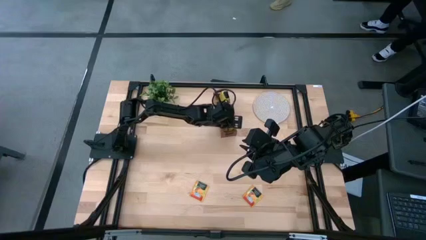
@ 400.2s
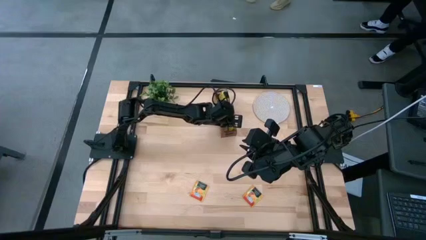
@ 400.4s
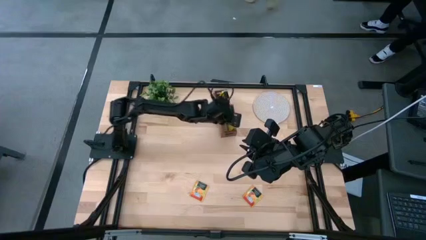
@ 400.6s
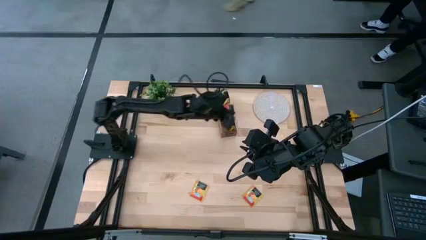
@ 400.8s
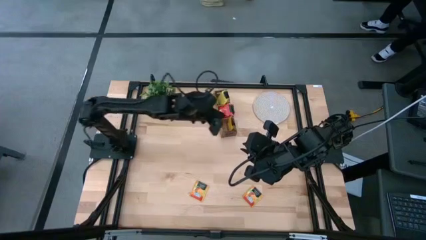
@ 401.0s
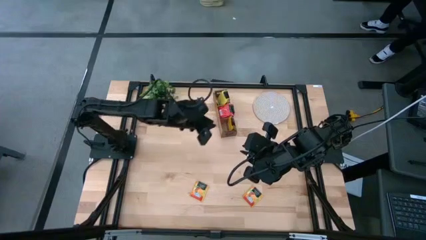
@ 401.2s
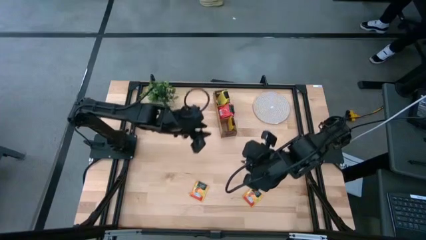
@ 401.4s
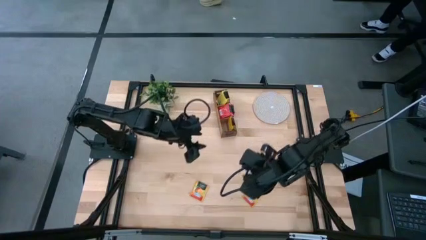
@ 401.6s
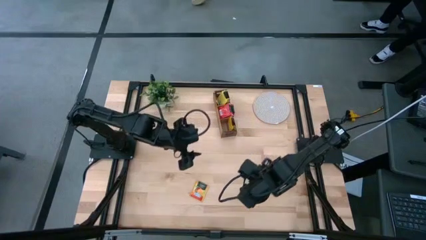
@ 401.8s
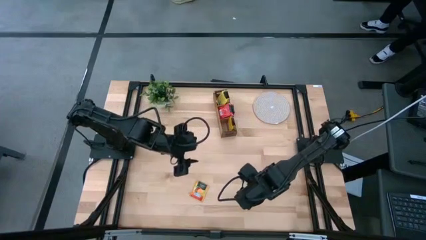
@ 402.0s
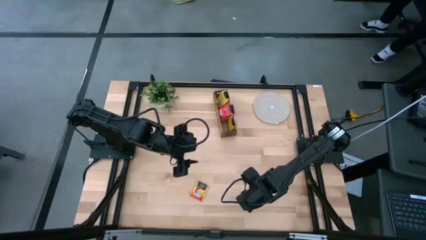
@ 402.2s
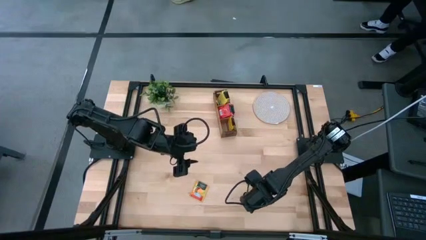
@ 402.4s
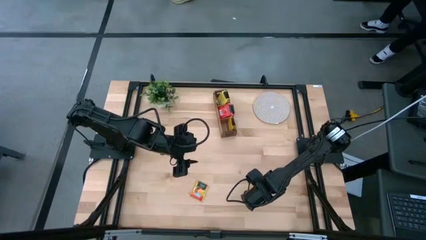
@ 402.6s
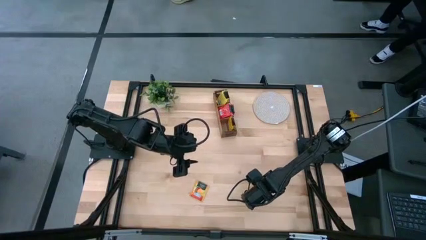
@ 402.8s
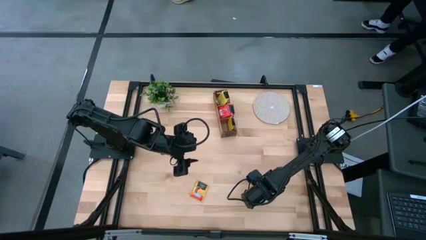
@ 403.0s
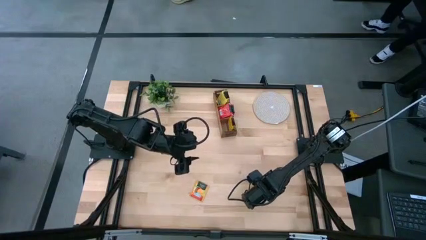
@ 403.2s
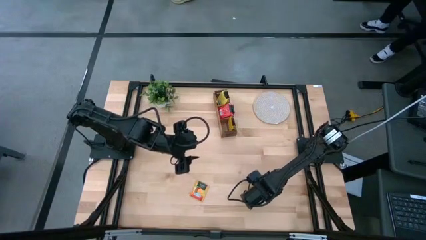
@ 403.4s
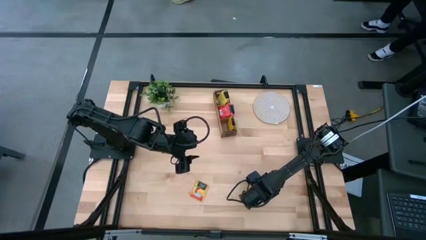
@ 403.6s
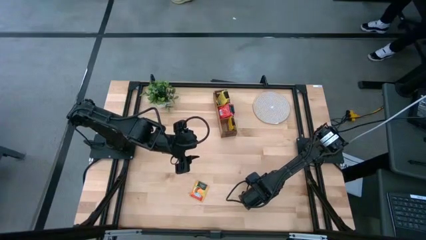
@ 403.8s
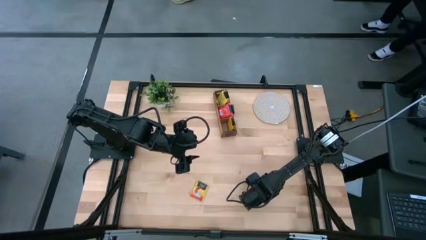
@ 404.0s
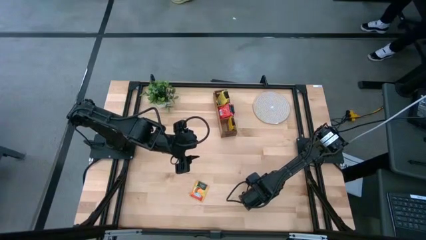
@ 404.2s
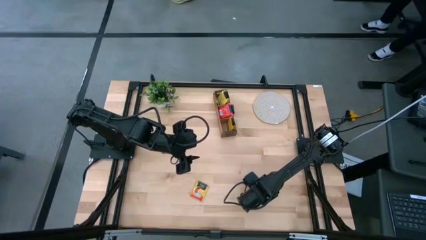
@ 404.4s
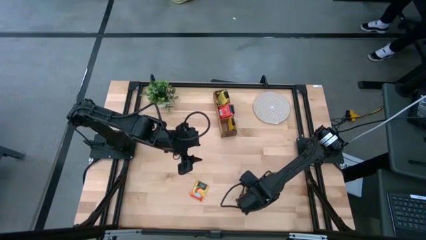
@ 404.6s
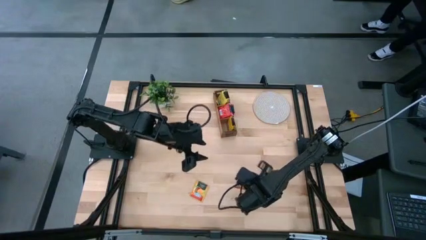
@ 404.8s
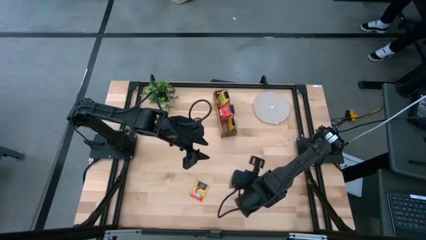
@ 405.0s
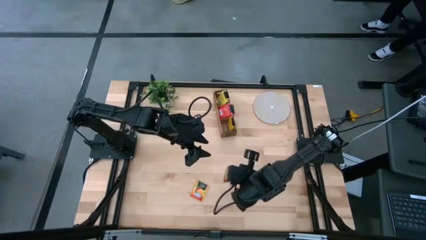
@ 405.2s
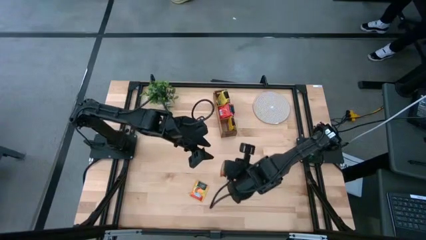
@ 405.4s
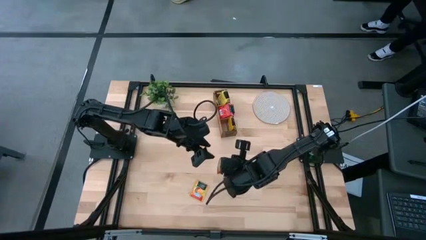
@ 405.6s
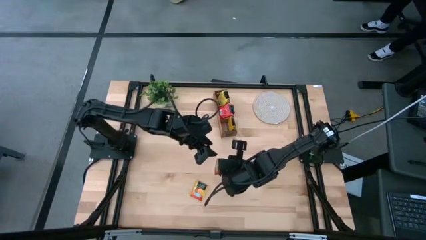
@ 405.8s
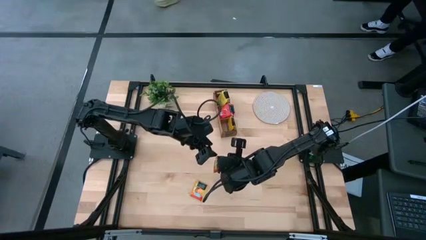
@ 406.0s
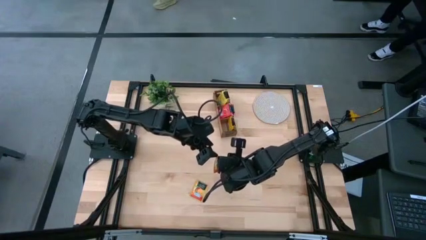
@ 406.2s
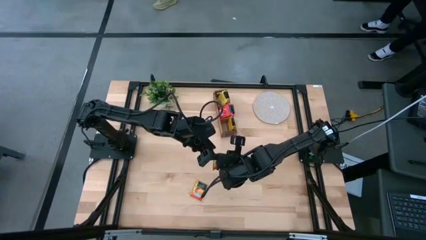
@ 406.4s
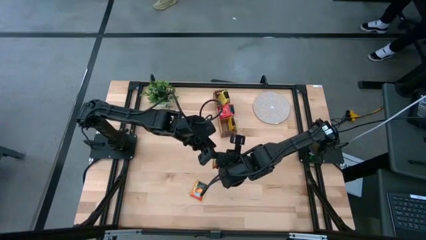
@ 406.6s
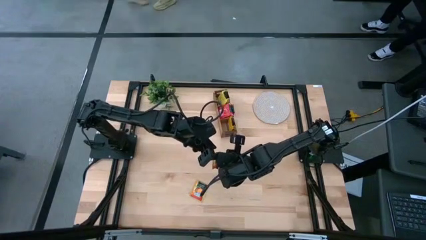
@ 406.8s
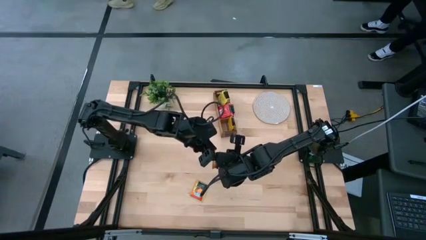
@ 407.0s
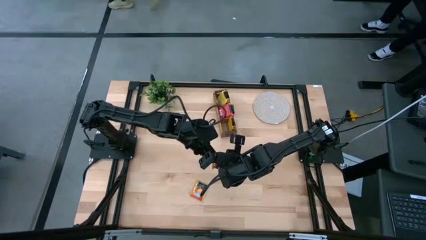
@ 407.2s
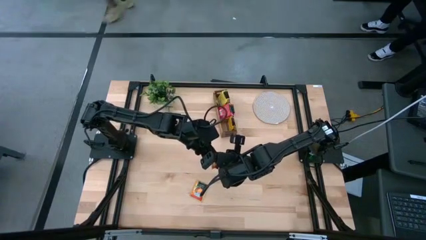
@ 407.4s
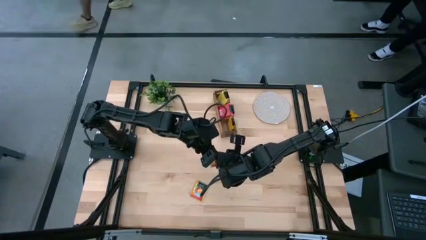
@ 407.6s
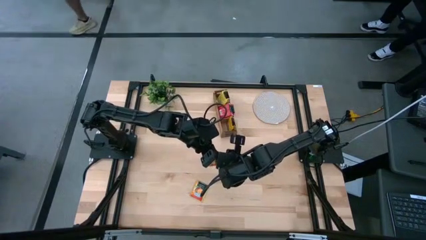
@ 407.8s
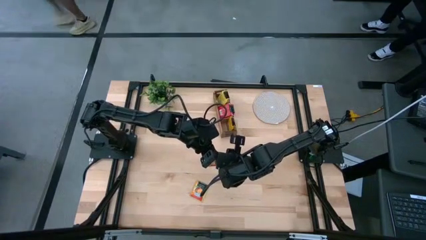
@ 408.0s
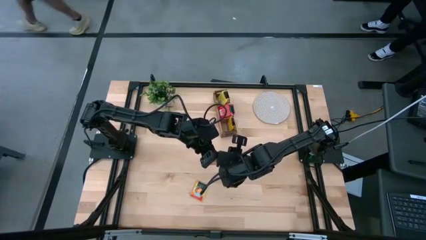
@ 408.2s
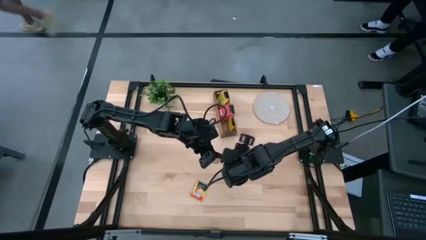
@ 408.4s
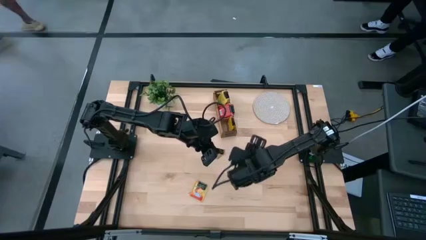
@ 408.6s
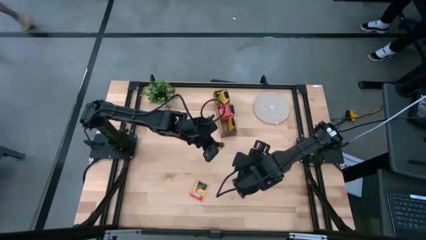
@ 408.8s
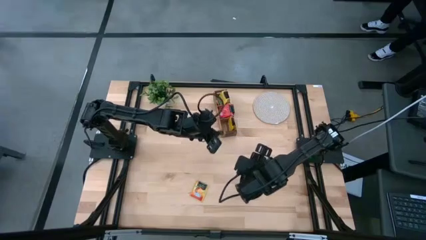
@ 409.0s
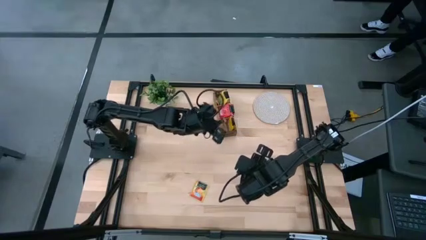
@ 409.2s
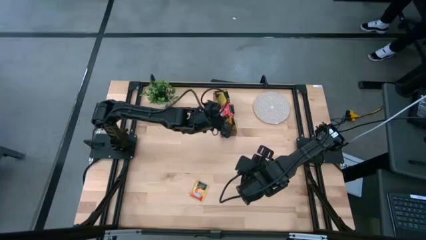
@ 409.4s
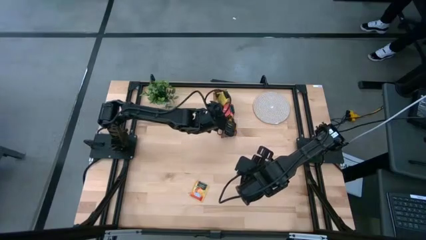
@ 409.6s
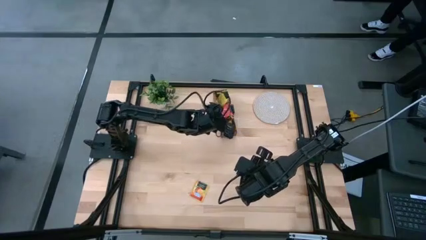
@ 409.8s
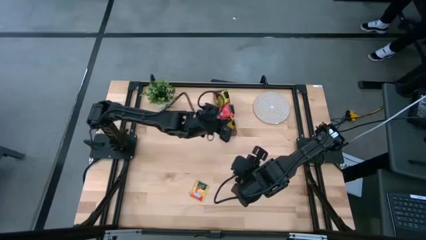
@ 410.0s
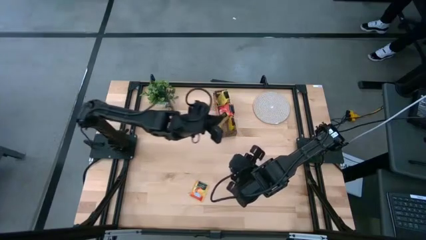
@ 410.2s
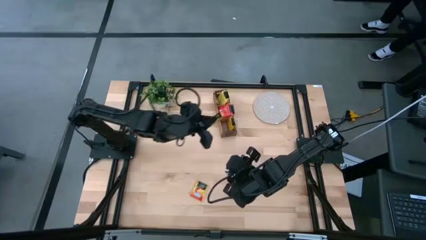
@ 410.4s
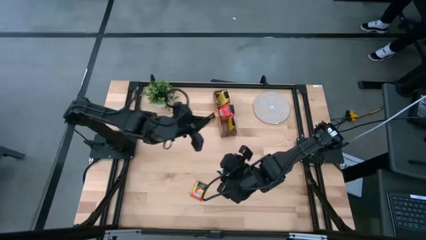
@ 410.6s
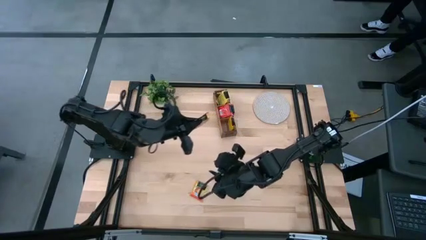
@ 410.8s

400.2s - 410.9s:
Task: Pick & Place Tea
Put the orange tea bag into the left section of the wooden organizer

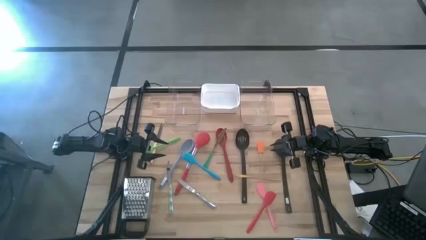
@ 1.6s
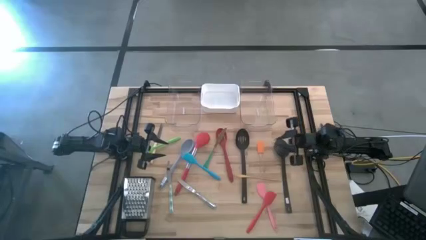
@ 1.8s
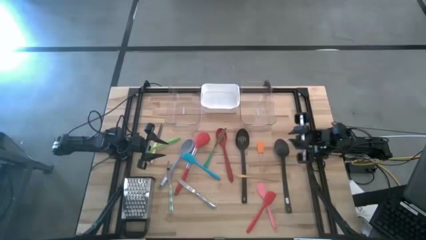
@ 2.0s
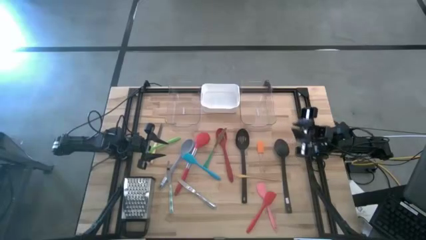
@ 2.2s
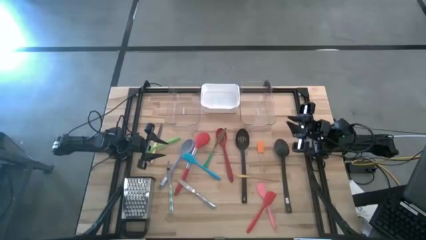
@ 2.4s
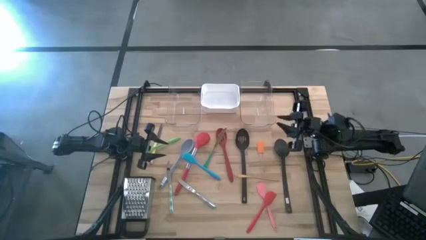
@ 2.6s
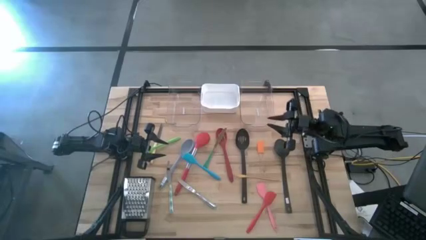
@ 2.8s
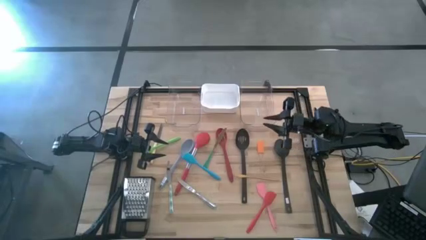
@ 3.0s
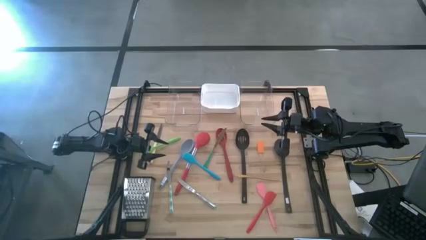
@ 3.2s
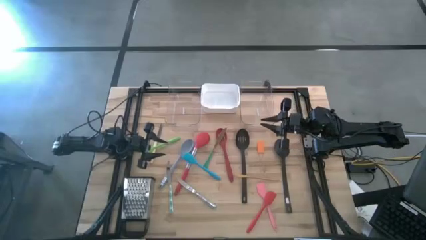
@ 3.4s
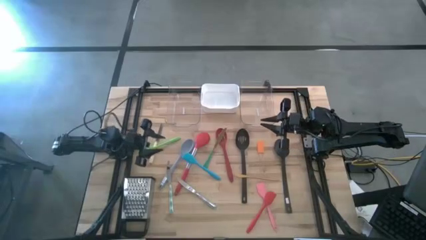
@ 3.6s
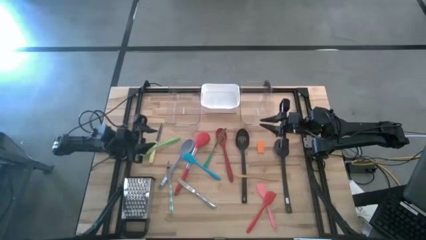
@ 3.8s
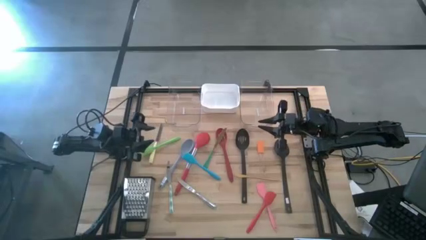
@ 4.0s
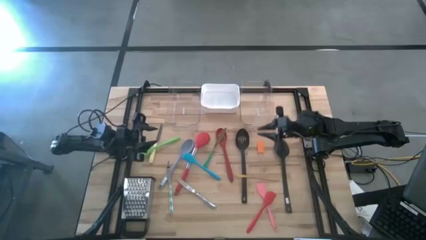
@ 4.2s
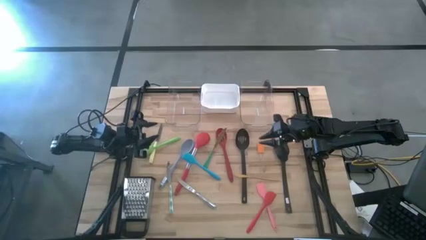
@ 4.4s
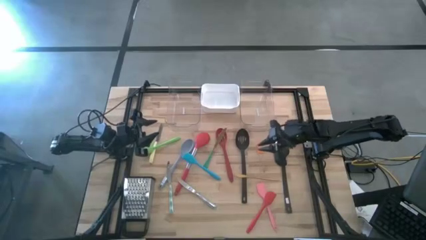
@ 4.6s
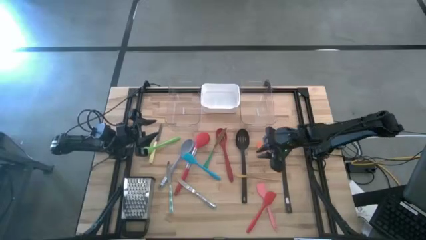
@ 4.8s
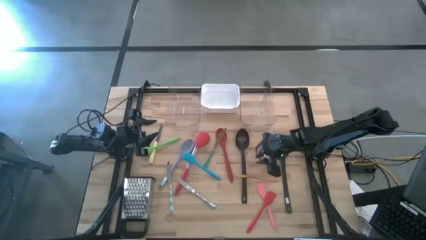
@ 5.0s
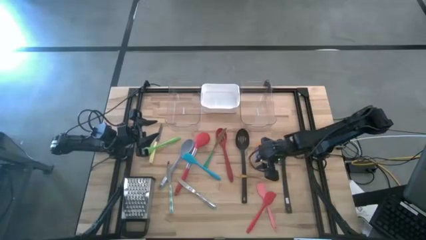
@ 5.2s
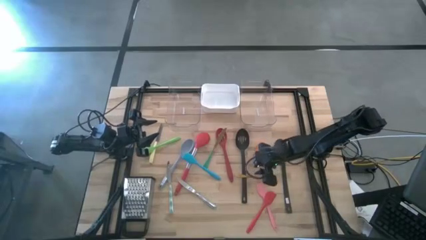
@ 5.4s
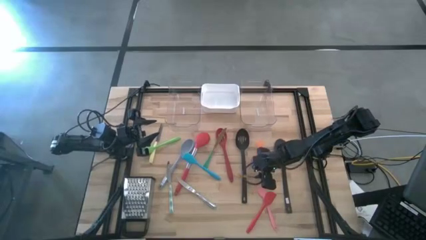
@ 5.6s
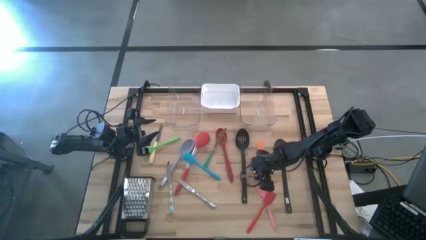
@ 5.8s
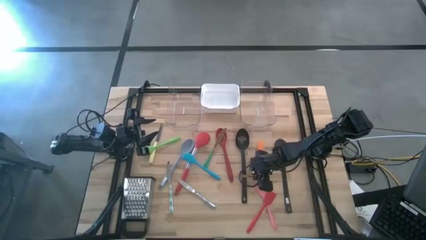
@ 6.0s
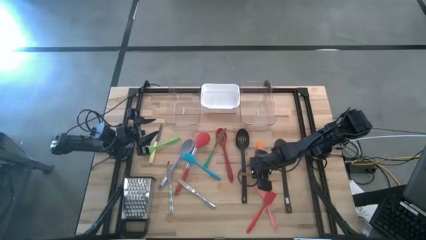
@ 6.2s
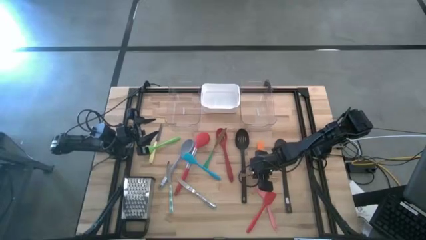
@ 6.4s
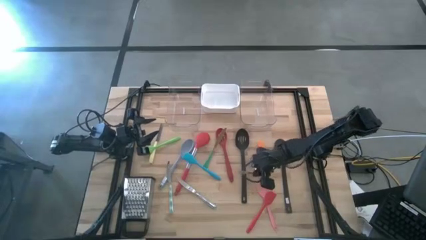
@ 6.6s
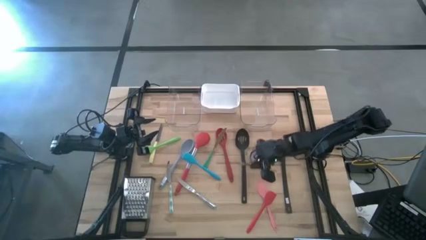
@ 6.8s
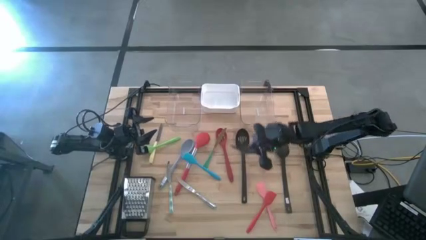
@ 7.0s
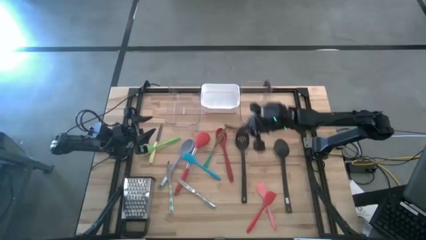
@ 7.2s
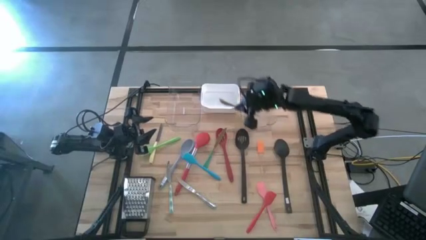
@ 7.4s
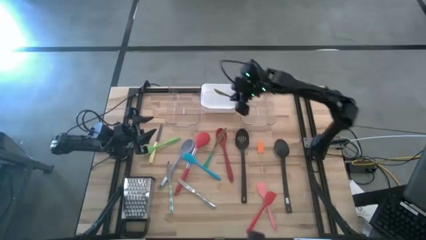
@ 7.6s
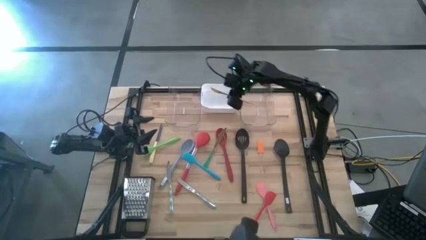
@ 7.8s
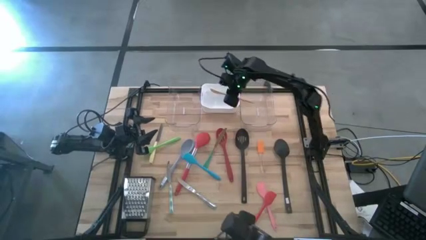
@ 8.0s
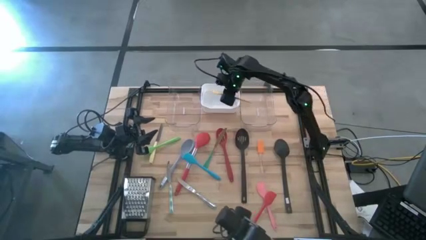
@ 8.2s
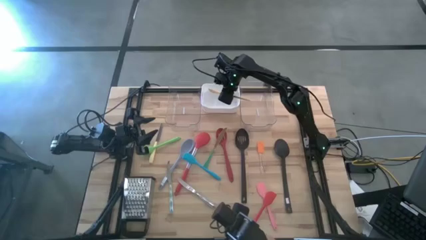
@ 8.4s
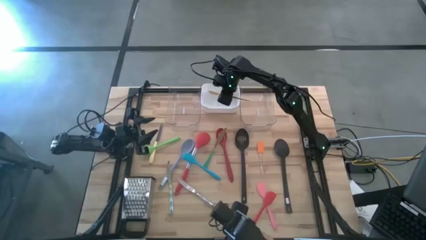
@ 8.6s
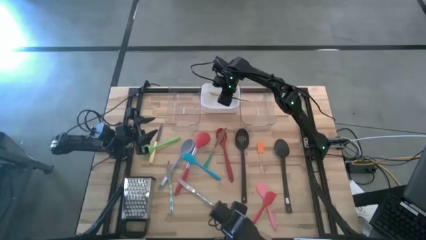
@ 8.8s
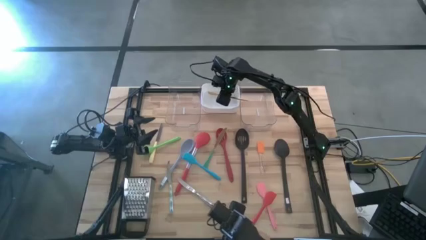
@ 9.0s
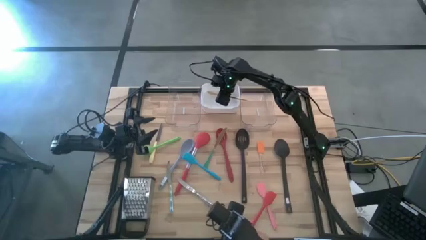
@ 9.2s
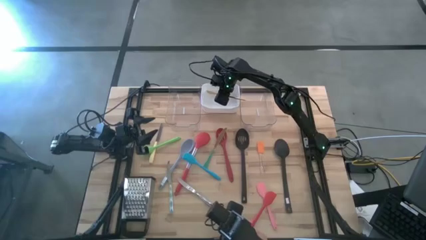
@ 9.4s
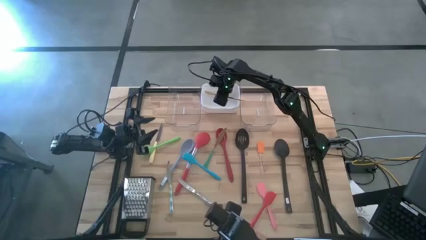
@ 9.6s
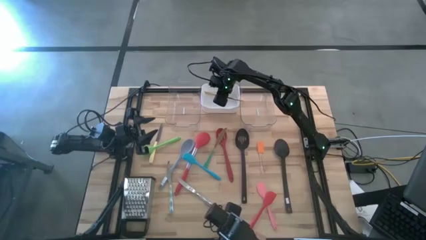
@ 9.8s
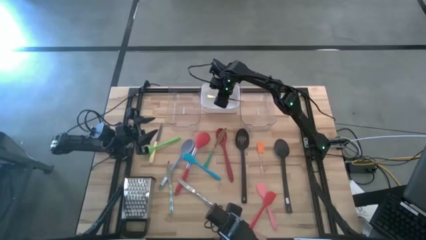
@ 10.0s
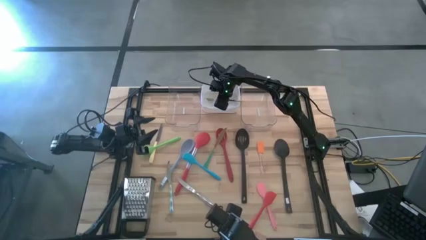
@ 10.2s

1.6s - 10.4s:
Task: Pick & Place Kitchen Items
Put the gold knife into the white bin
